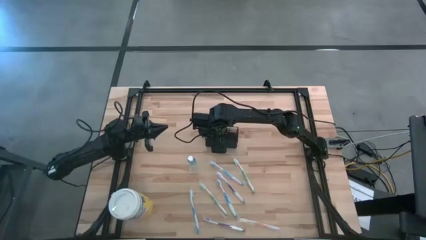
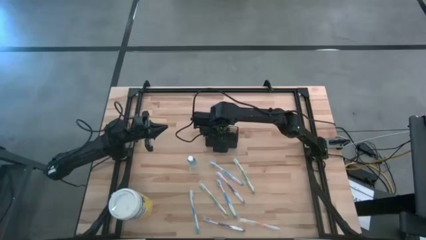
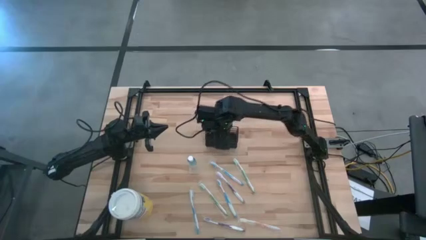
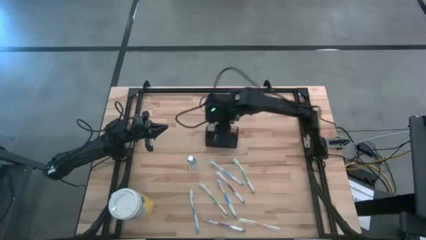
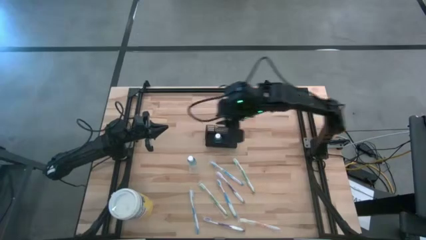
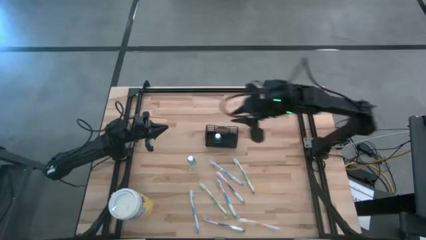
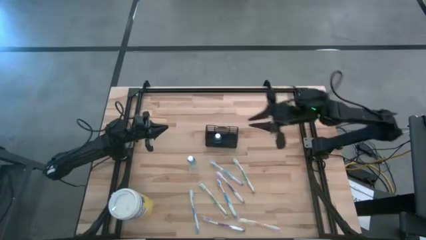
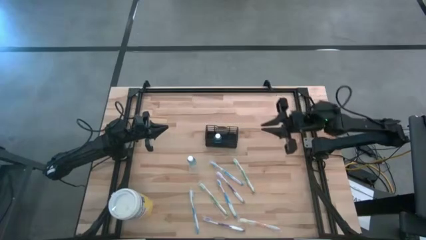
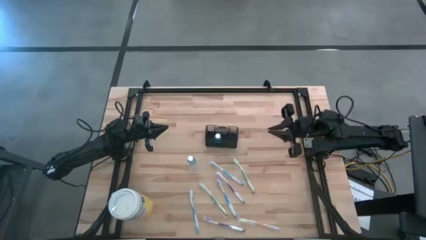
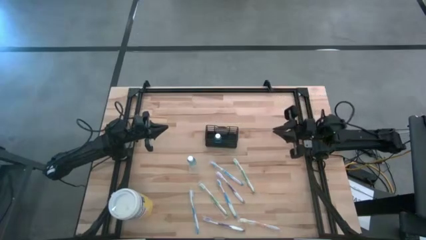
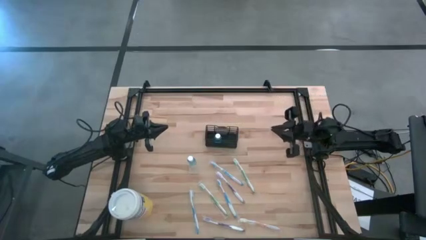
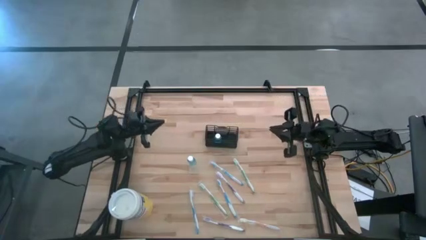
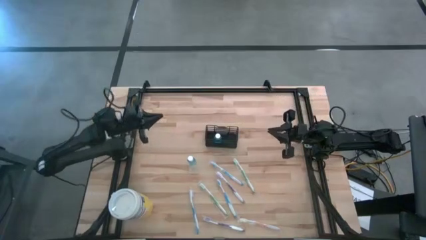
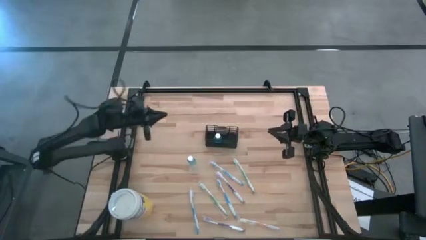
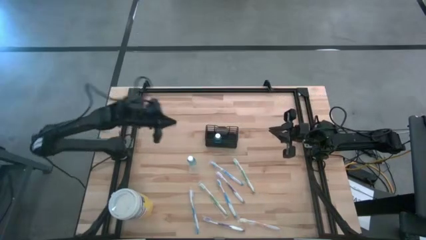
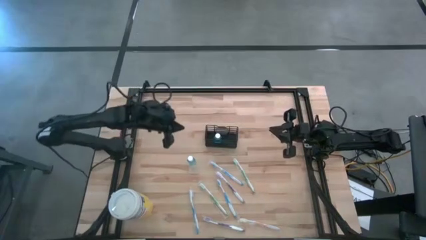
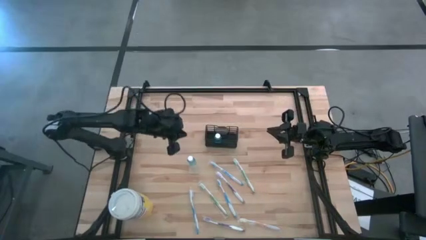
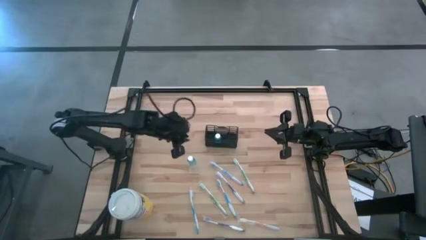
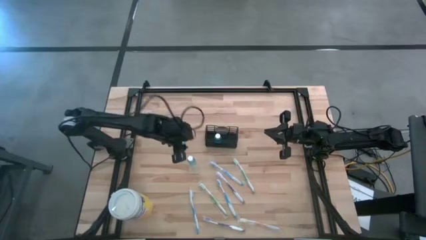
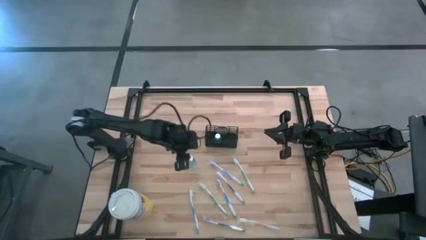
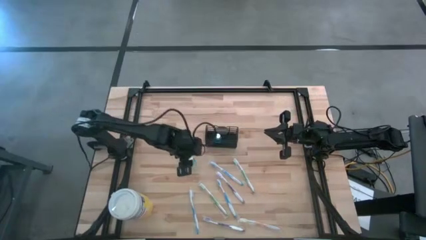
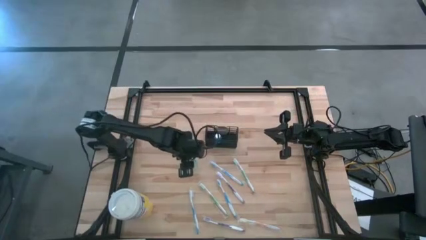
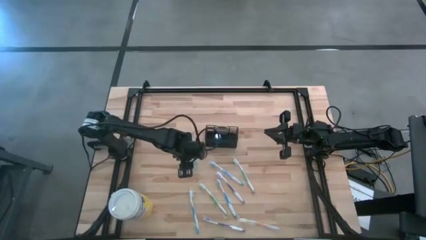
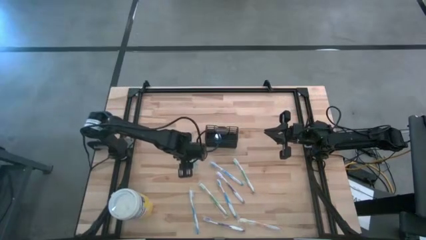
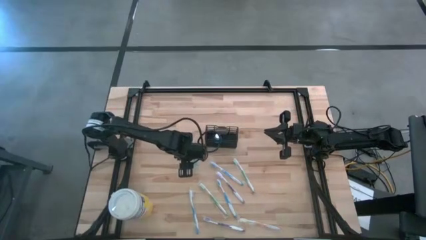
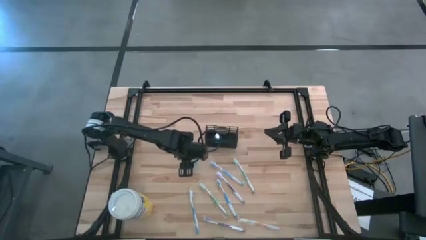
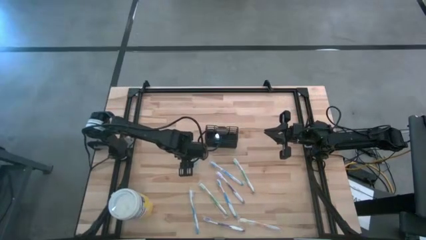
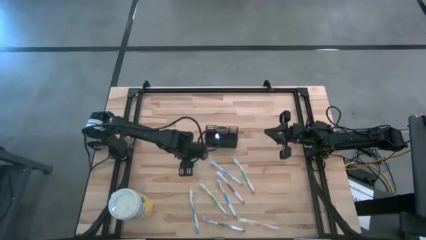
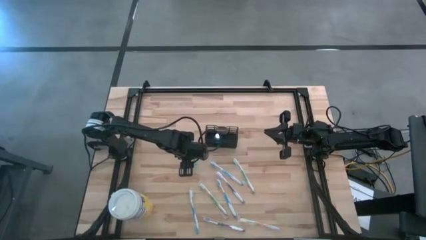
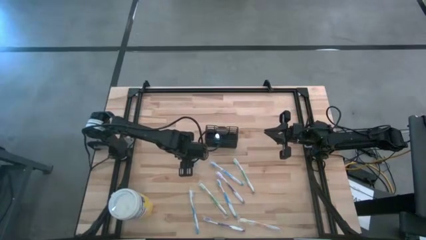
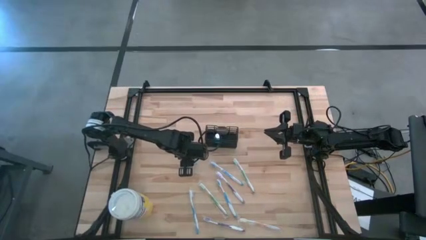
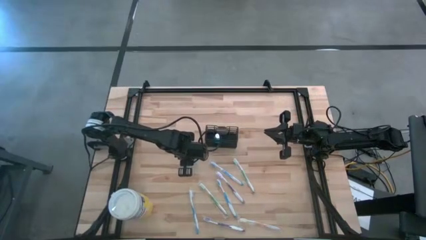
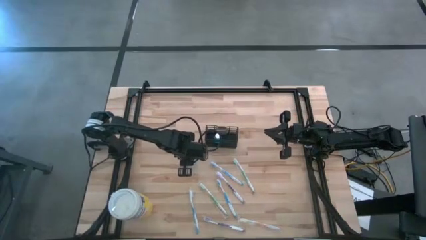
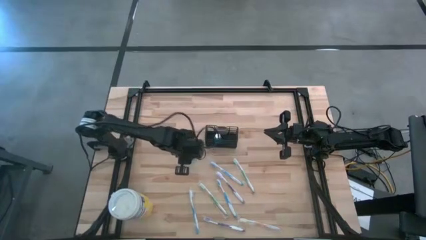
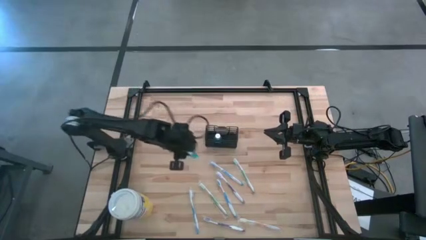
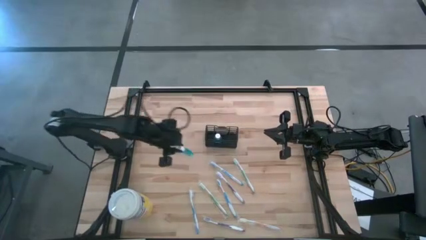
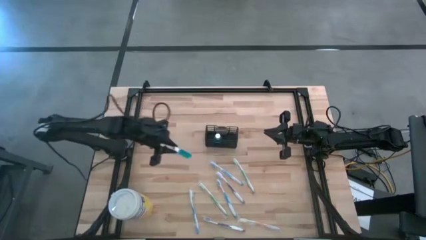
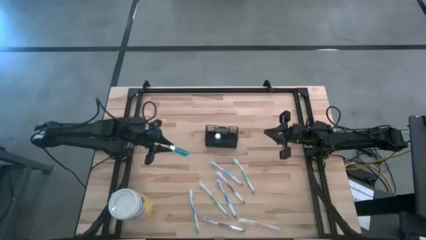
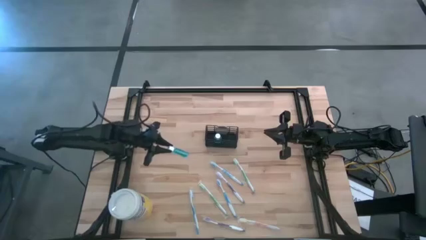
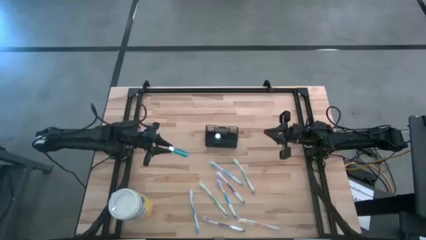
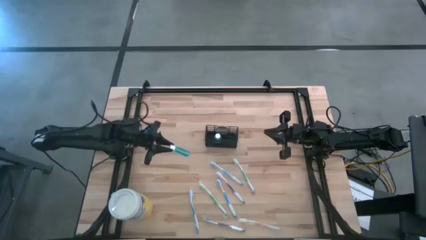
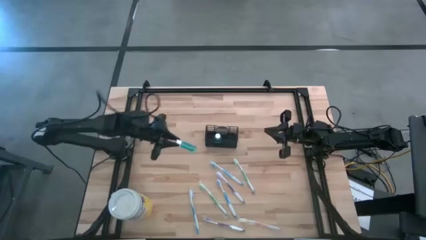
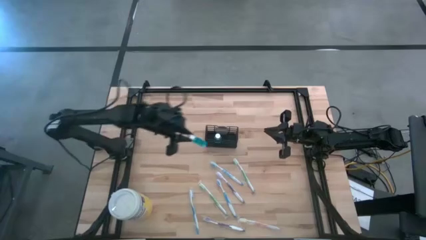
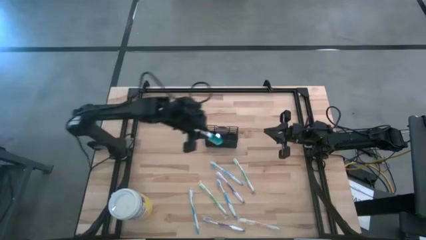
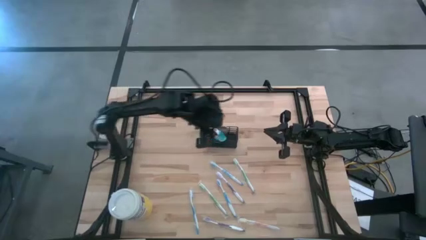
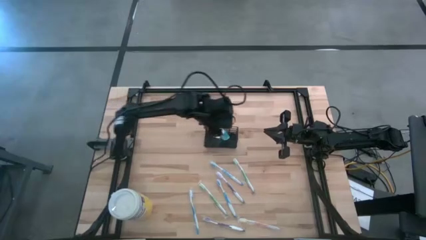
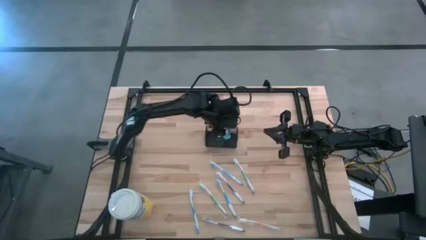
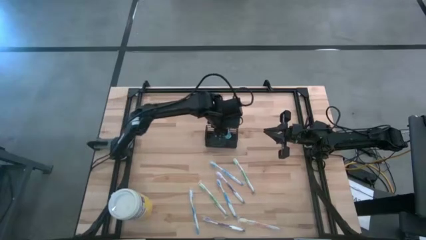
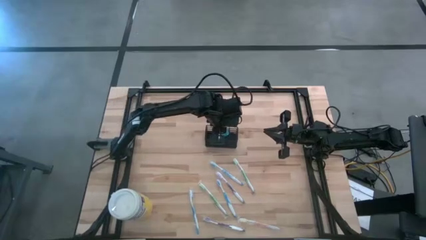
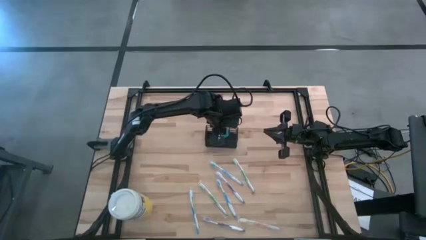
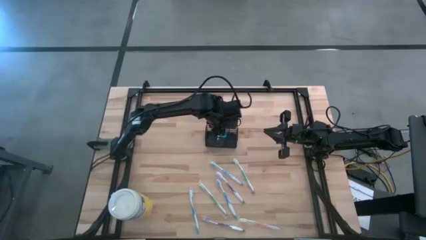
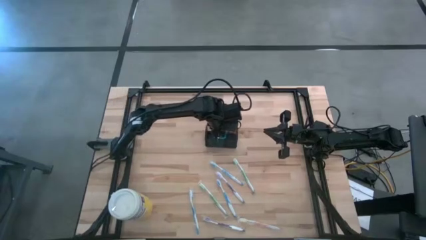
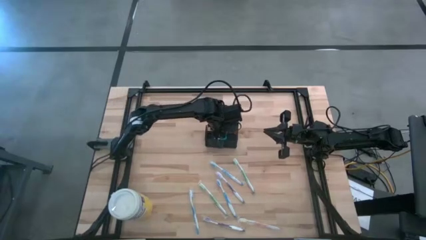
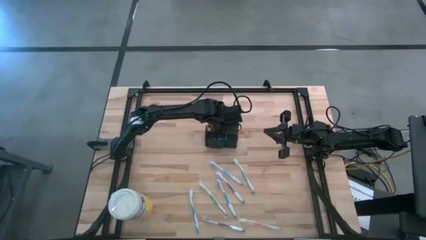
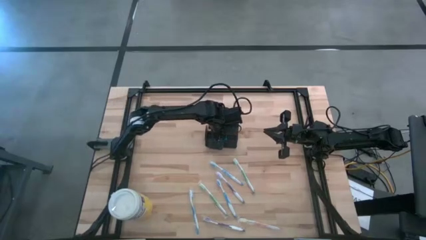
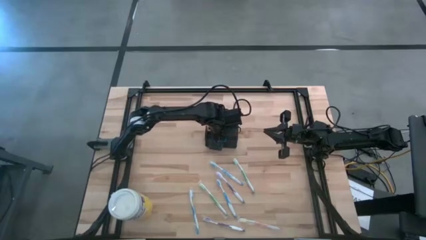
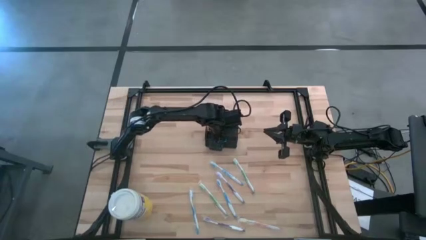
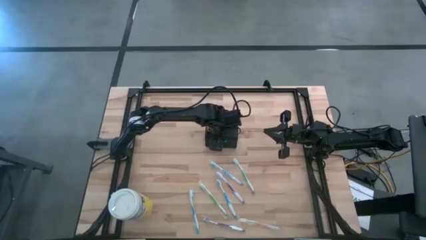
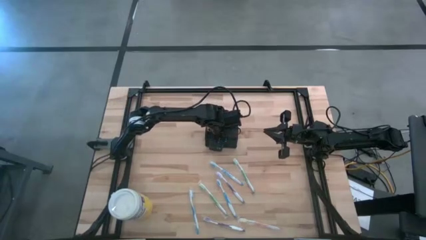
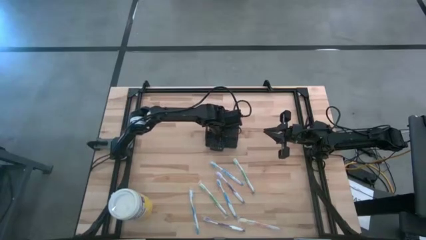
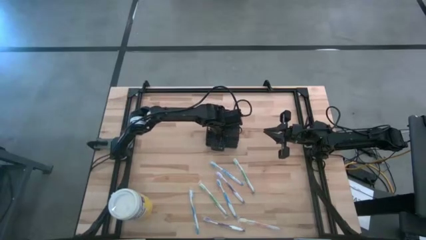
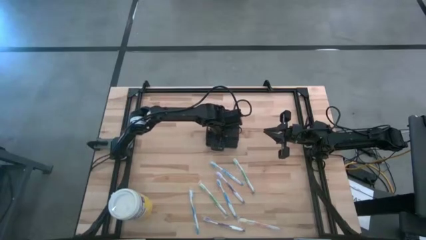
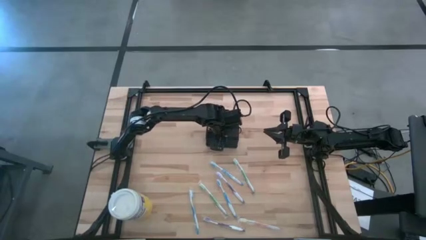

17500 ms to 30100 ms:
Task: Pick & Place toothbrushing station
Put the mouthwash into the wire organizer

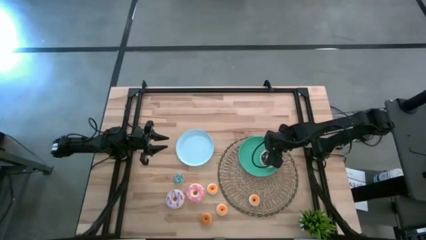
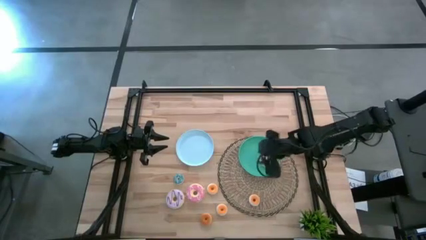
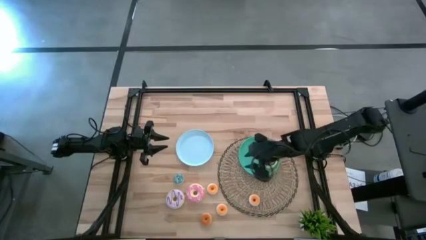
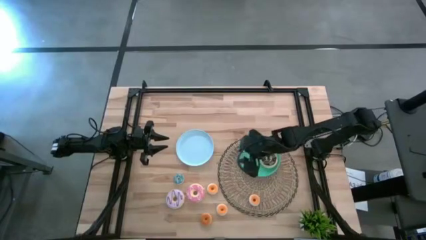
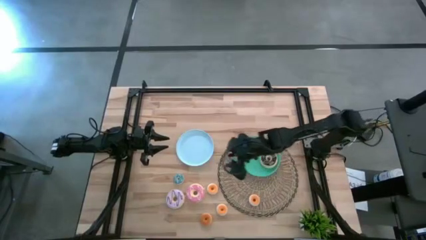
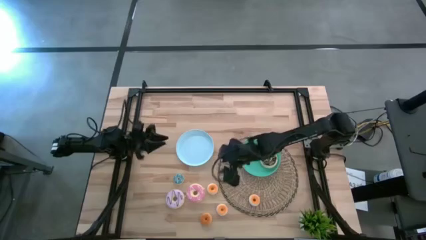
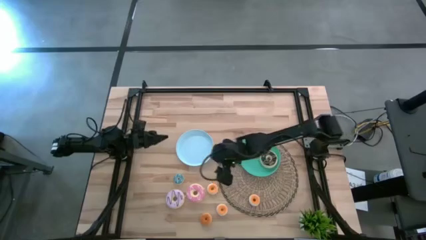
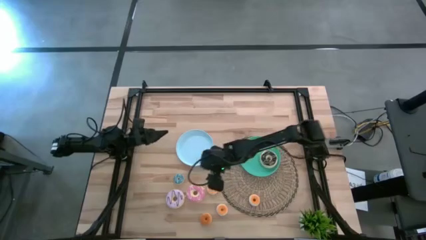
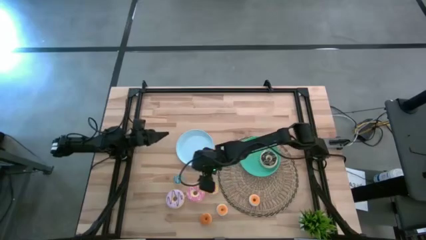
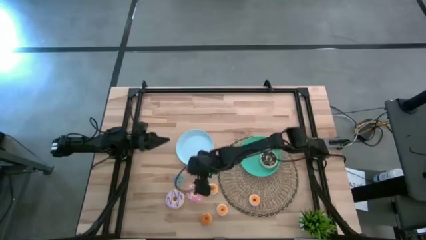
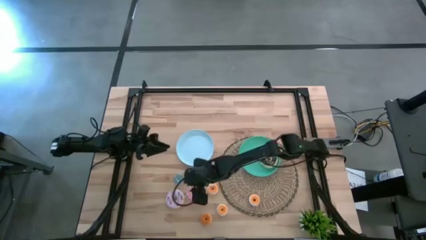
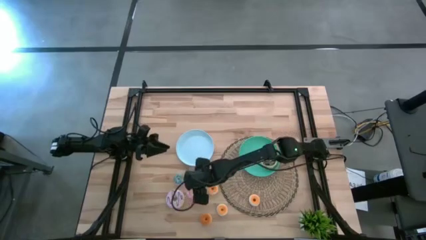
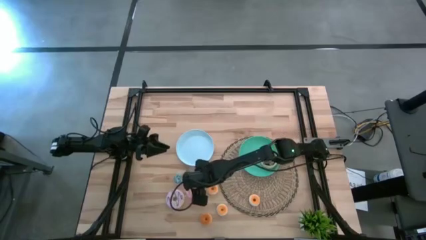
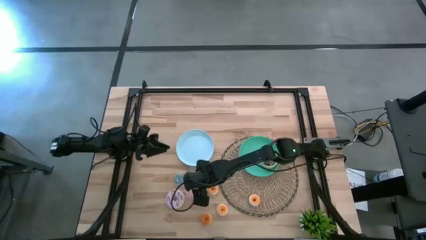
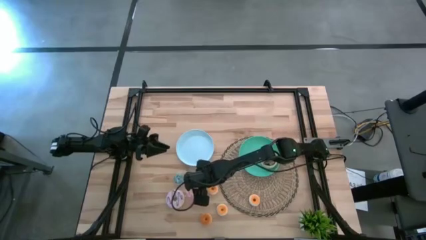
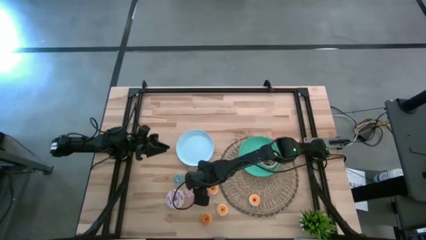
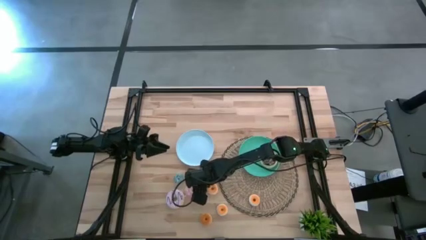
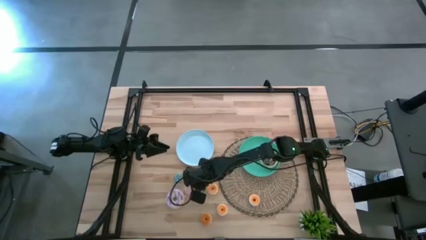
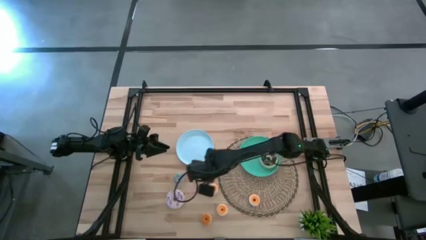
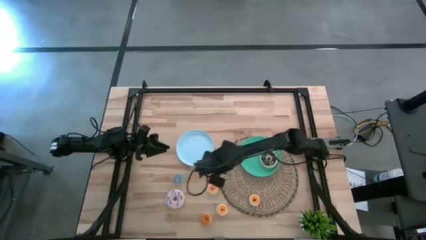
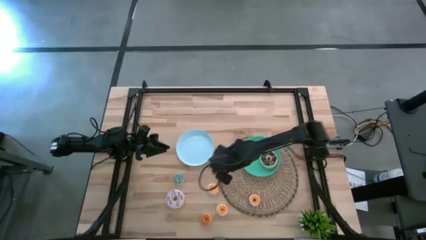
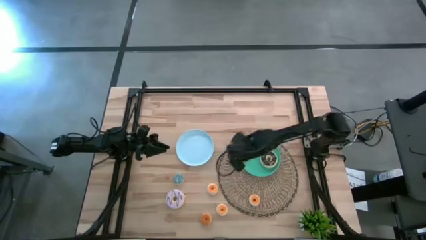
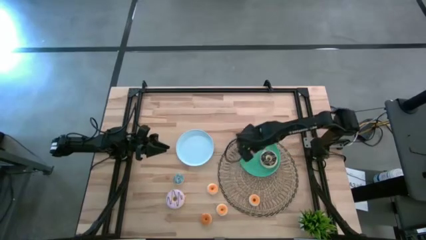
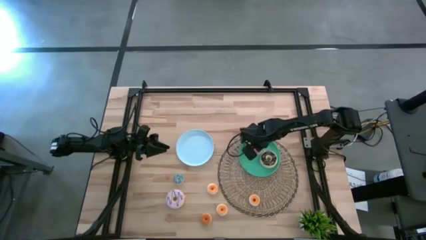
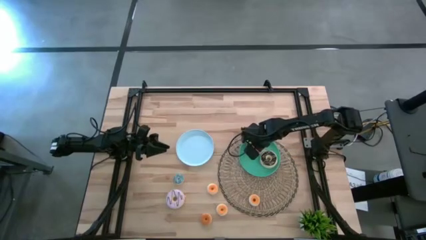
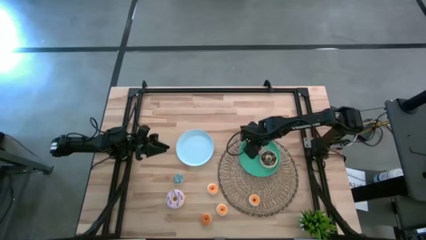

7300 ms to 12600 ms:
Task: Pick & Place donuts
Put the large pink donut onto the green plate
